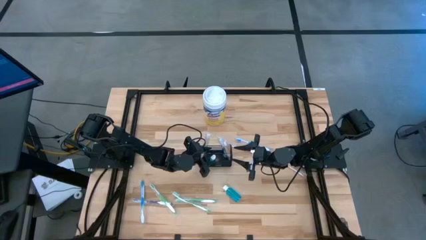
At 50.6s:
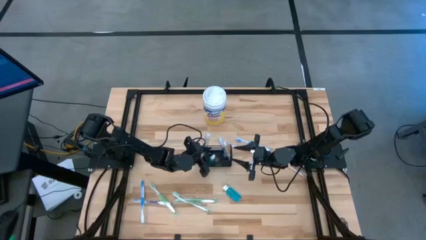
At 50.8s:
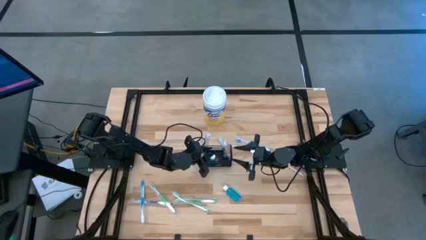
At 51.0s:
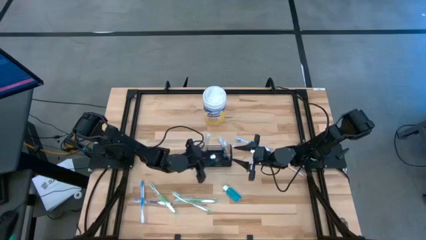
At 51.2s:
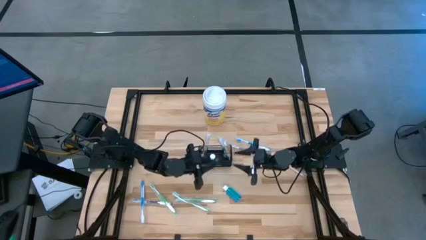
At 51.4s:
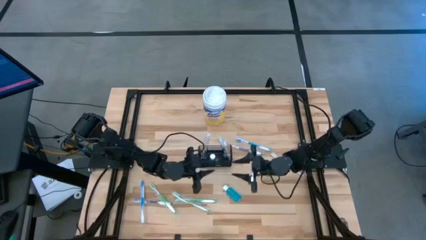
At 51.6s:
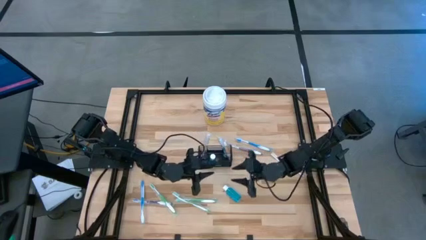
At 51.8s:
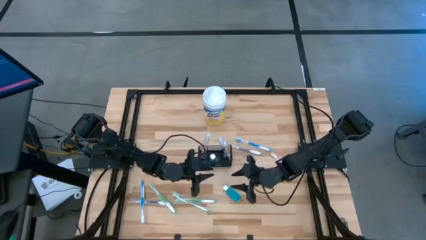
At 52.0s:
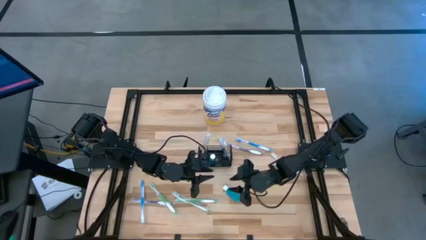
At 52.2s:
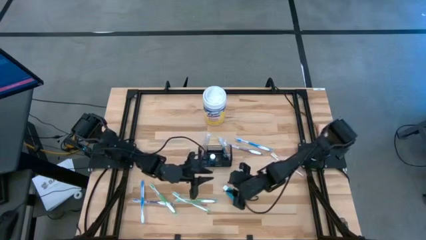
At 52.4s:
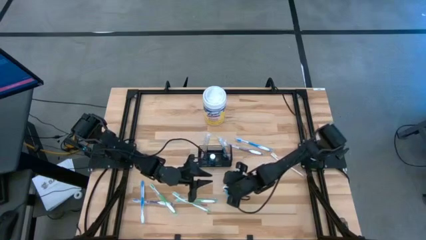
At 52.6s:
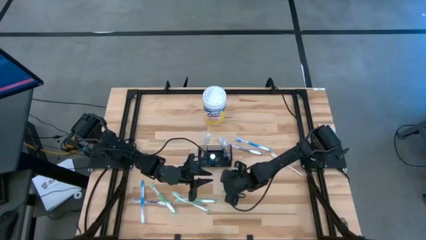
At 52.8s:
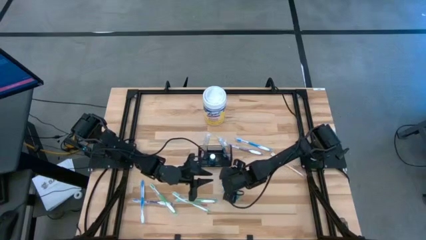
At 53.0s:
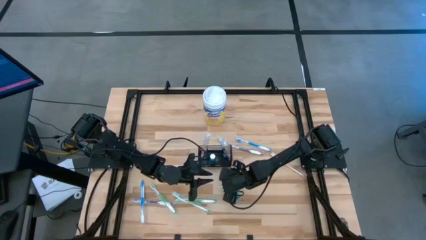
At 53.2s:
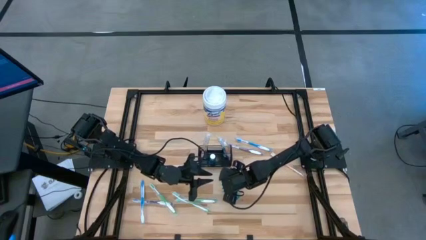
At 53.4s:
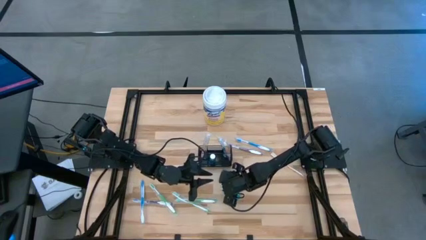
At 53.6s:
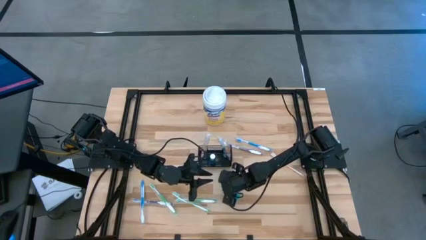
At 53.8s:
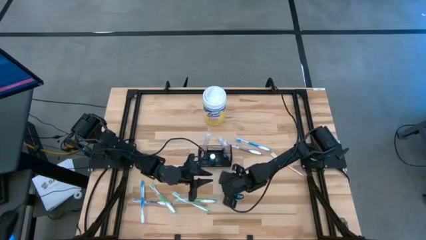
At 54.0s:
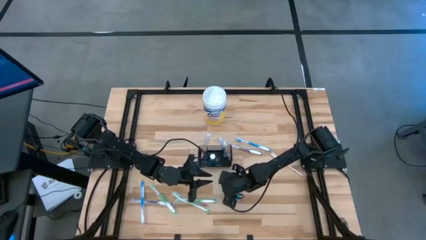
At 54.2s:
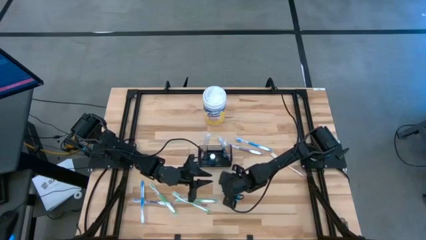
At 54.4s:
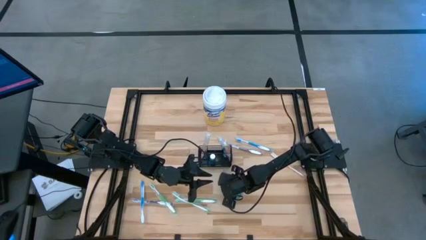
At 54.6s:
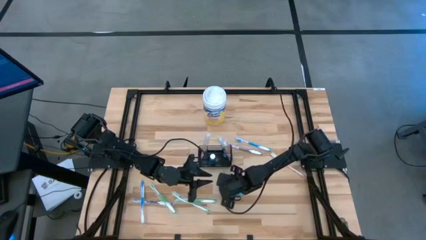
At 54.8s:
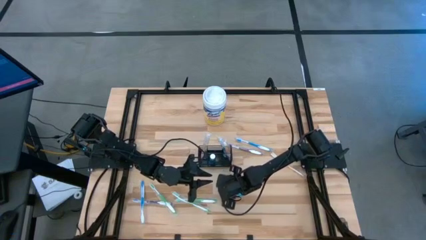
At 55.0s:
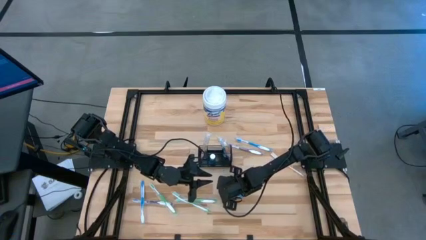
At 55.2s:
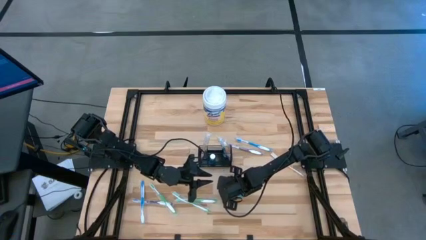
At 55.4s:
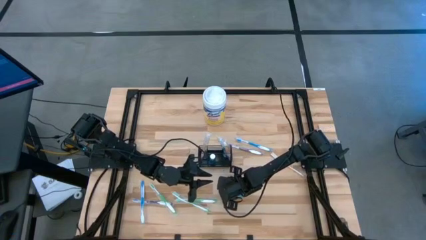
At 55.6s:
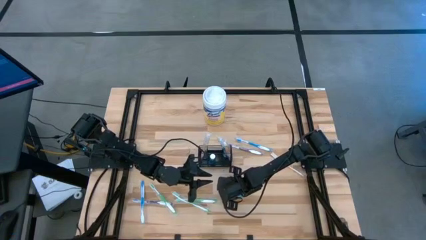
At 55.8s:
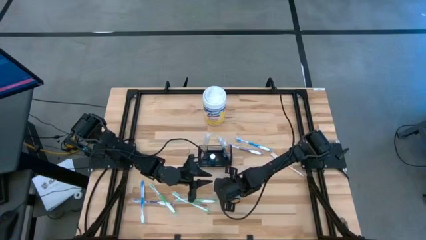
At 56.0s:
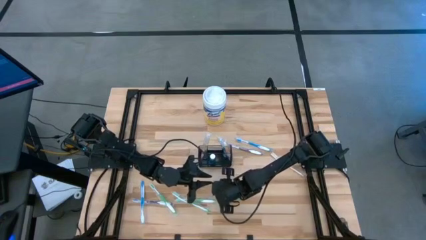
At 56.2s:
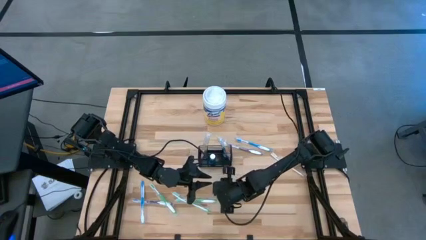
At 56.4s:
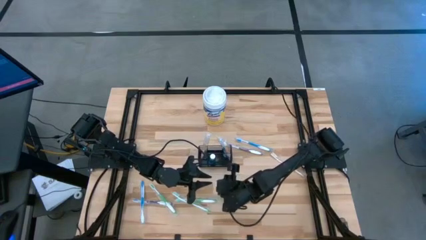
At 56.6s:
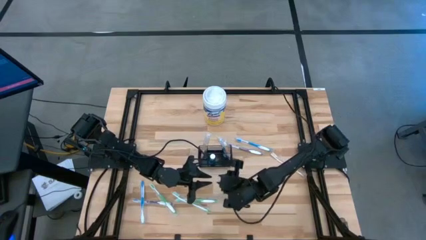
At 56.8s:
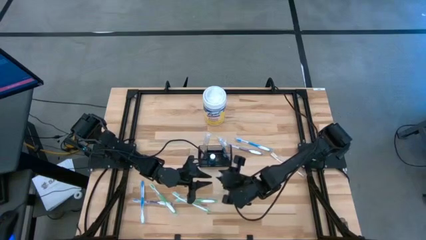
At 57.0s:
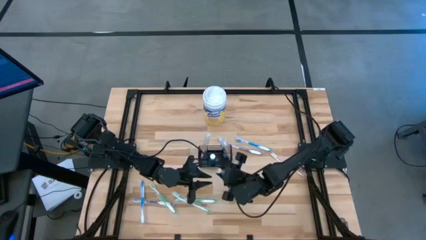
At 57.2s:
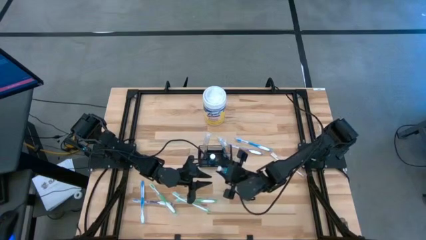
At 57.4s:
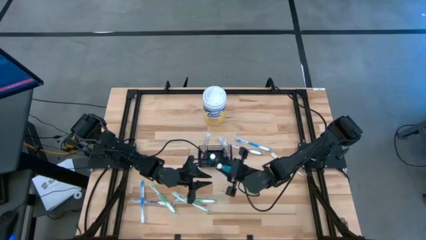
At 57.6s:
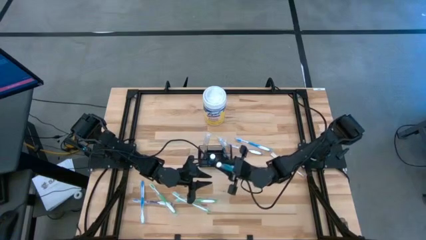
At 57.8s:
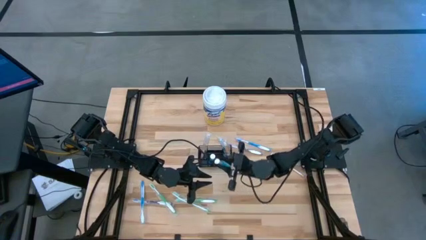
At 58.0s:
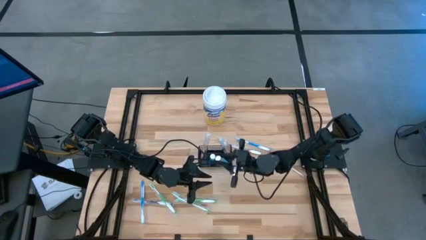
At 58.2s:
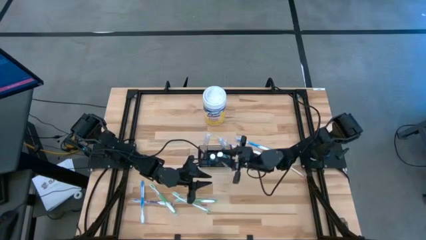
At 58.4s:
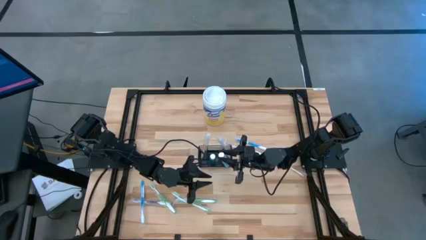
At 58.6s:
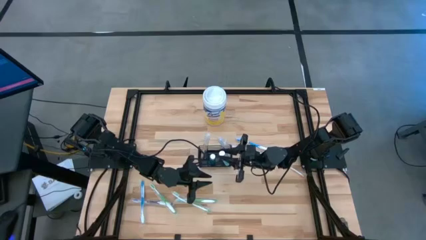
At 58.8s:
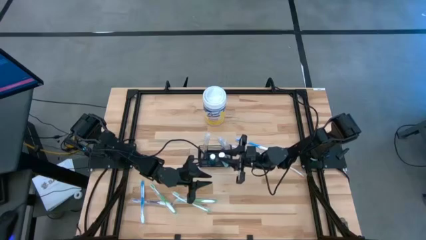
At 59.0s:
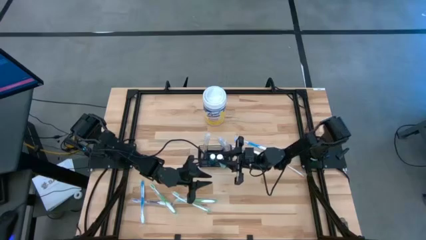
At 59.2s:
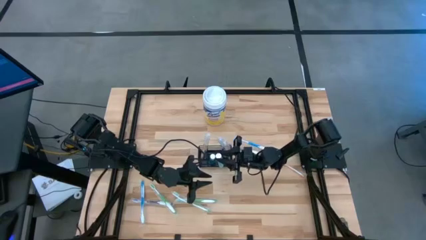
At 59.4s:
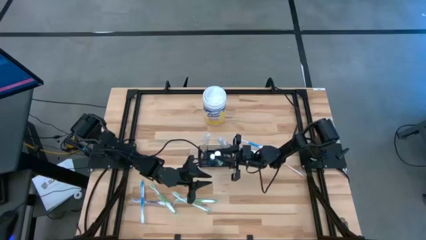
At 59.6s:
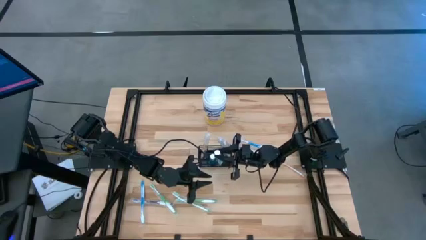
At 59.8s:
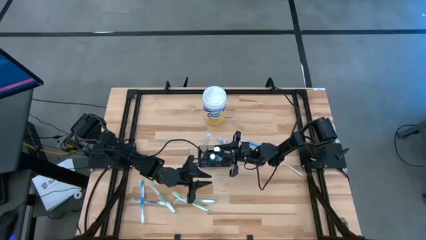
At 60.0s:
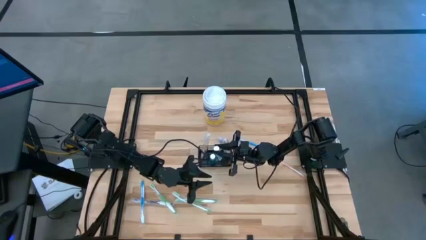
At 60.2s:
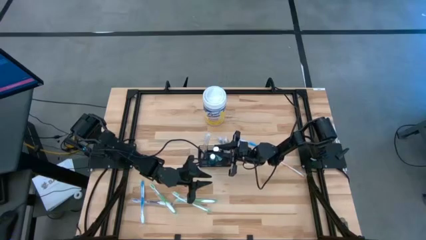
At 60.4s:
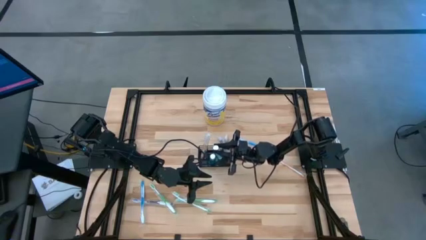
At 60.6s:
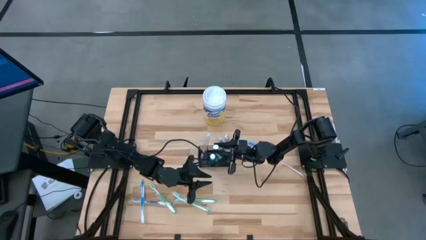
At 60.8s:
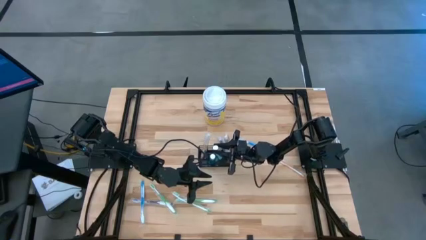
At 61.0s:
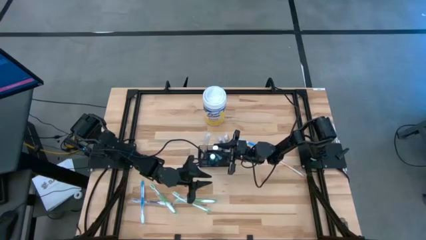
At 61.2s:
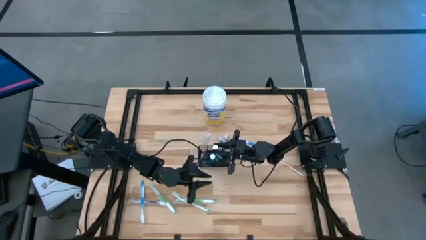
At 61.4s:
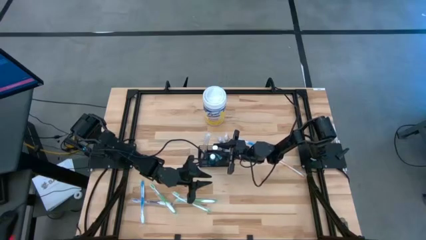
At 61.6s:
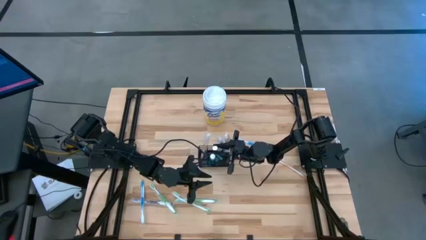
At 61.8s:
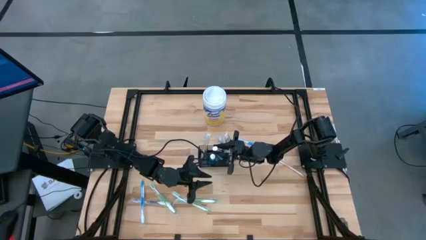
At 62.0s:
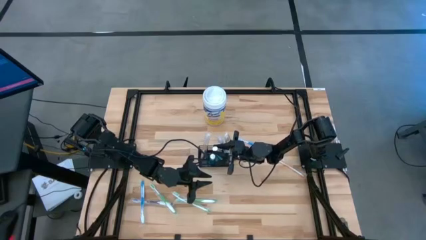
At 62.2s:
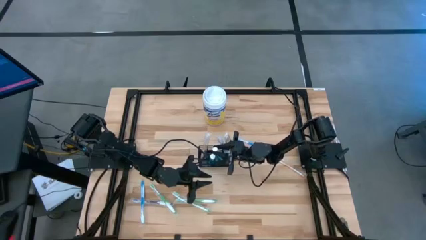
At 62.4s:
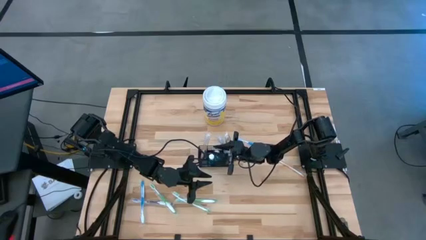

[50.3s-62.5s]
Task: Pick & Place toothbrushing station
Put the blue mouthwash into the mesh organizer

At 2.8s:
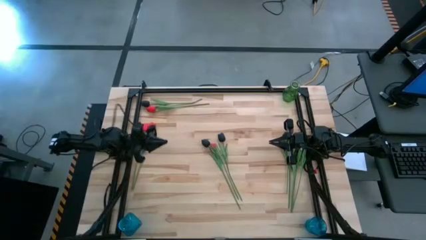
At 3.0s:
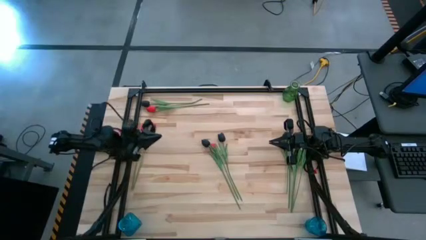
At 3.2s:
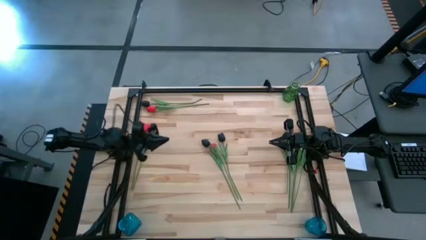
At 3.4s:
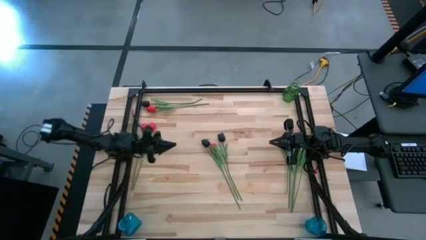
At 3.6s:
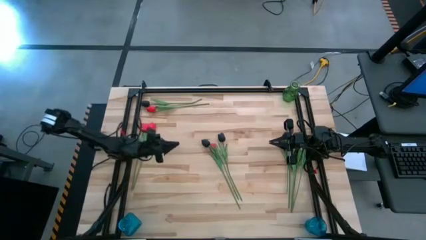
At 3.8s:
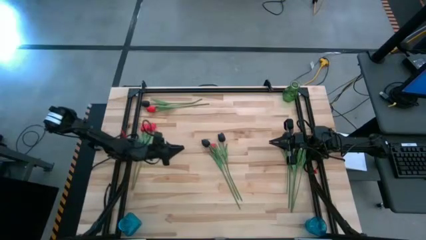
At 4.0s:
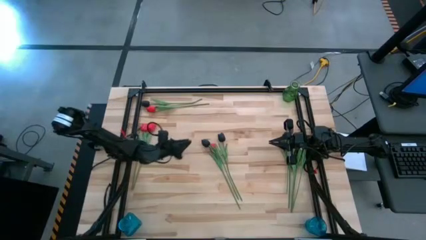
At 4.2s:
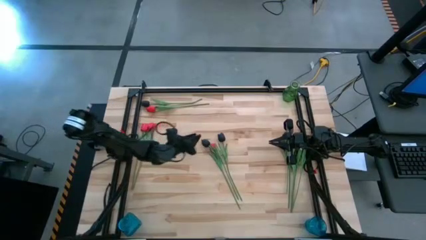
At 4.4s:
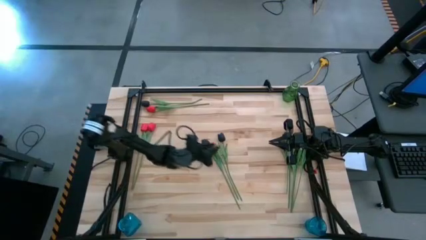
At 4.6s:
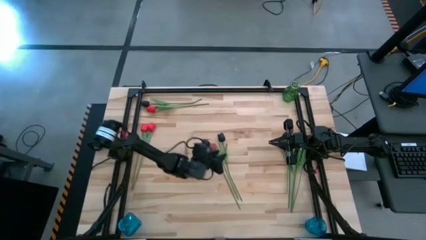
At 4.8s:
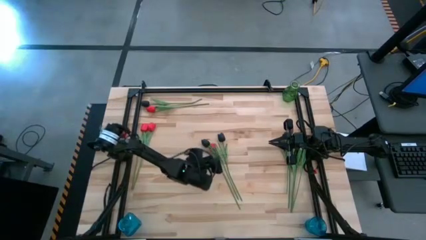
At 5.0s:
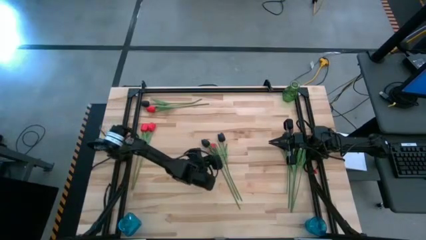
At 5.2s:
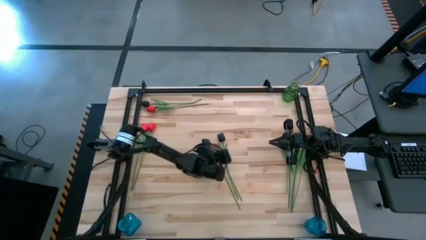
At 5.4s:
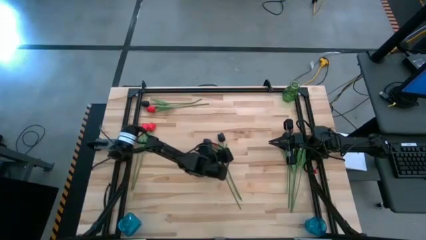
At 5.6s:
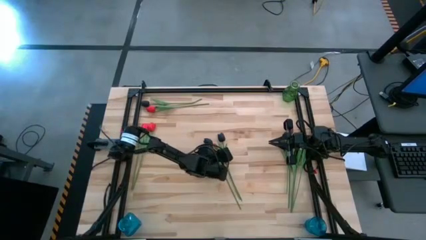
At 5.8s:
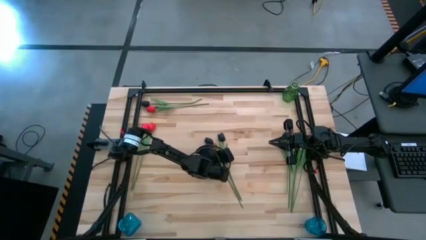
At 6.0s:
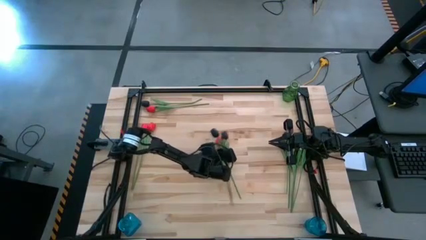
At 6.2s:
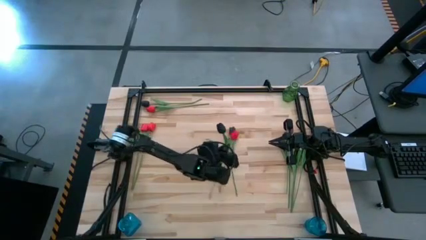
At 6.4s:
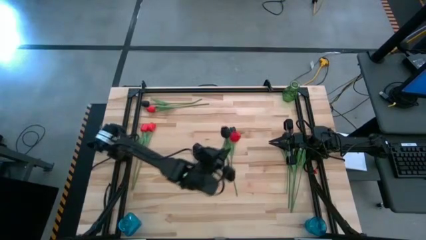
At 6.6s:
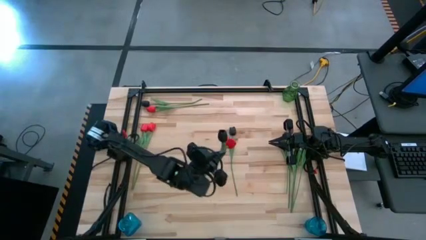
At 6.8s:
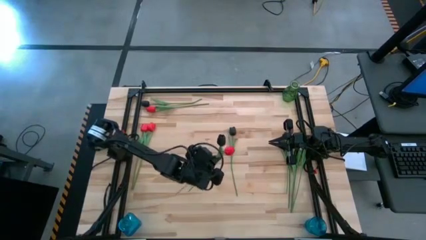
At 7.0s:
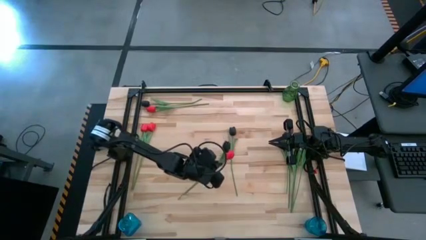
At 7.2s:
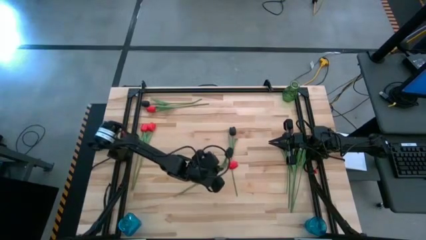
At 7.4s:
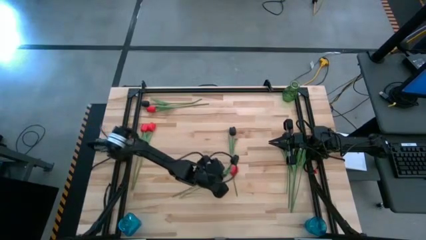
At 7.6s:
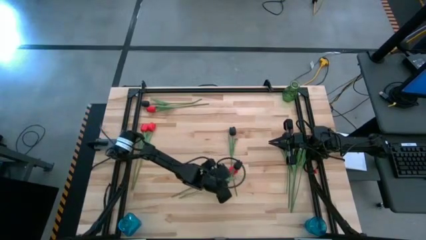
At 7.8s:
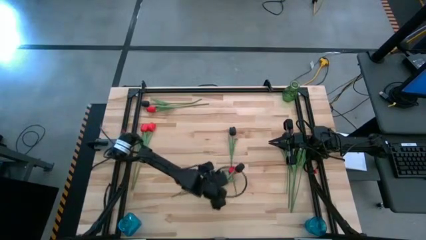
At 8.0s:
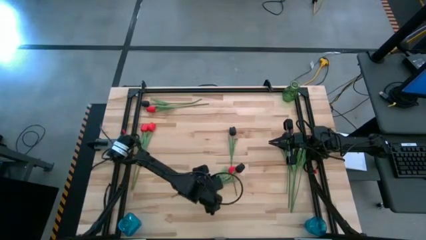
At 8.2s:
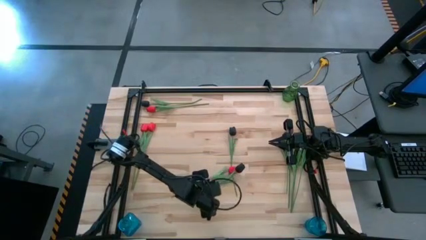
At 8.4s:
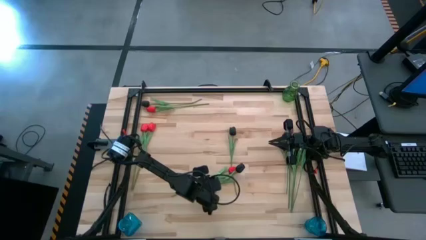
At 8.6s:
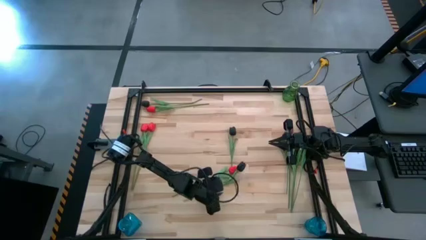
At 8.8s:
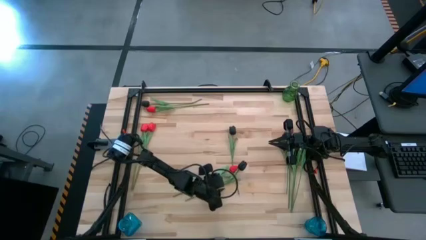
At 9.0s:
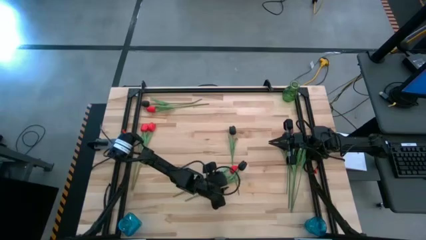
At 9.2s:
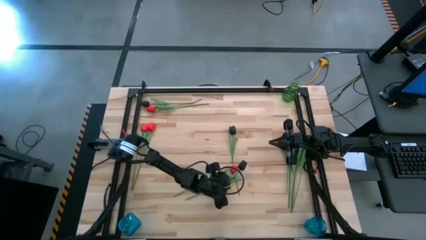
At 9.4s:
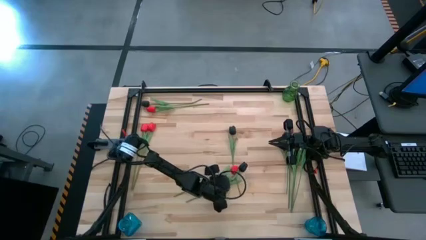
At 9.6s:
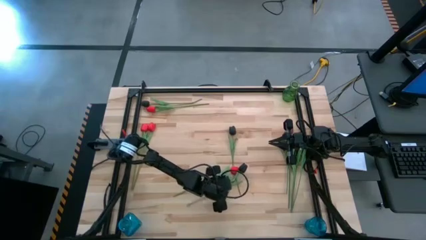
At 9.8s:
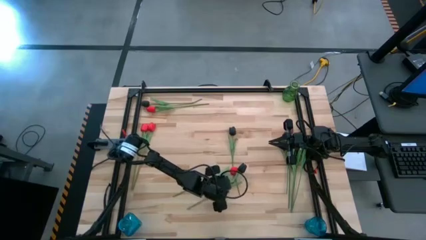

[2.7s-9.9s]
Task: Sort flowers into vase by color
Put the black tulip into the left blue vase
